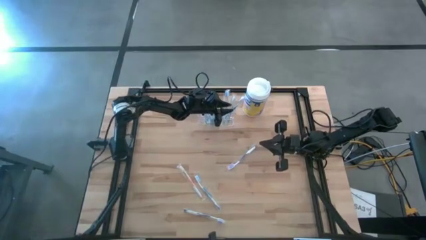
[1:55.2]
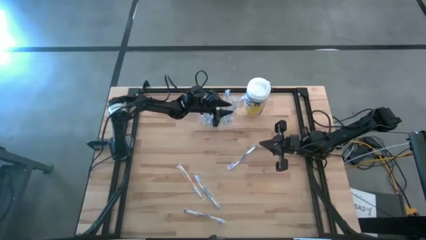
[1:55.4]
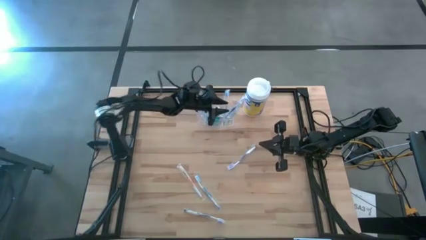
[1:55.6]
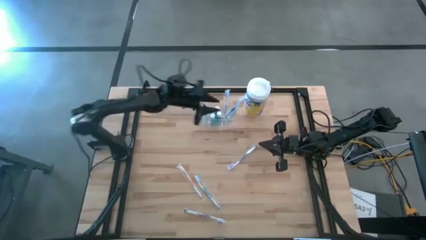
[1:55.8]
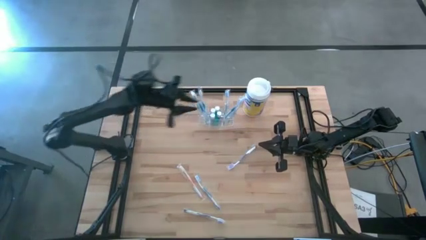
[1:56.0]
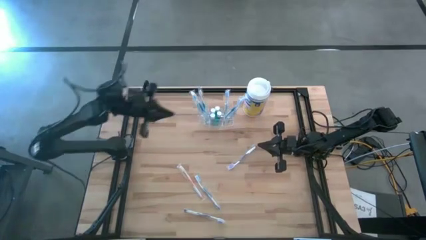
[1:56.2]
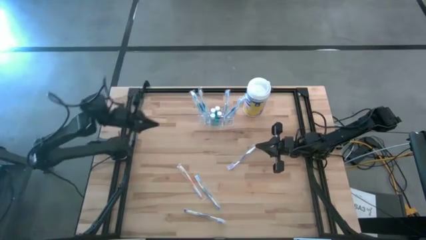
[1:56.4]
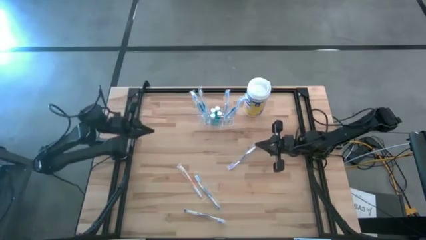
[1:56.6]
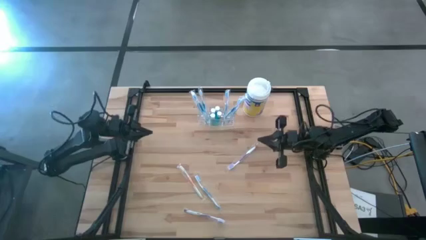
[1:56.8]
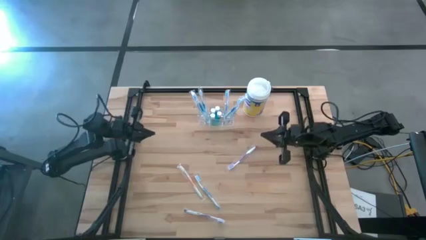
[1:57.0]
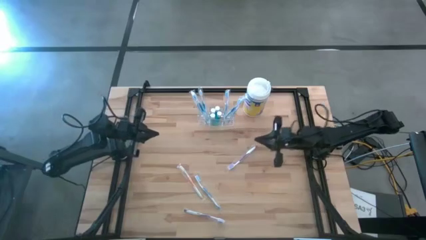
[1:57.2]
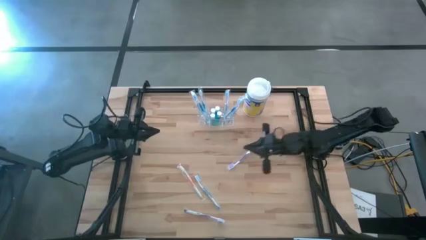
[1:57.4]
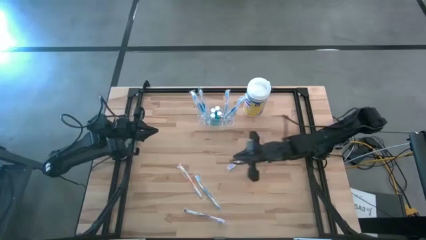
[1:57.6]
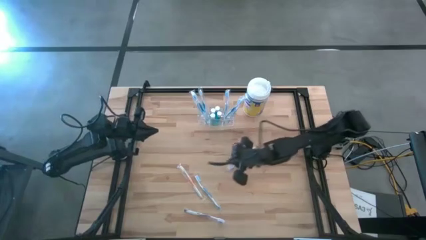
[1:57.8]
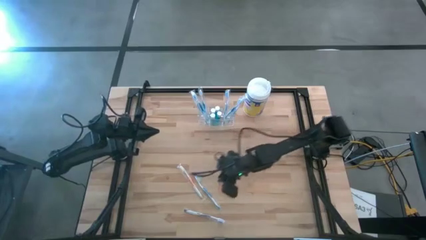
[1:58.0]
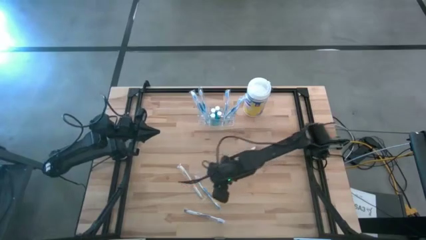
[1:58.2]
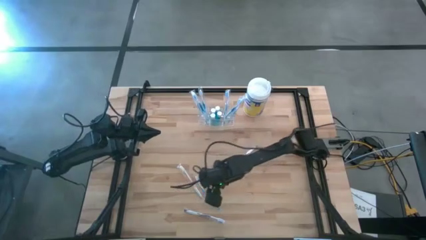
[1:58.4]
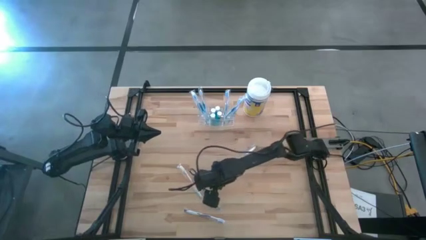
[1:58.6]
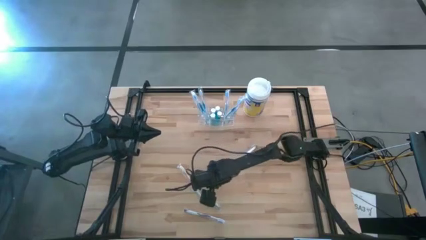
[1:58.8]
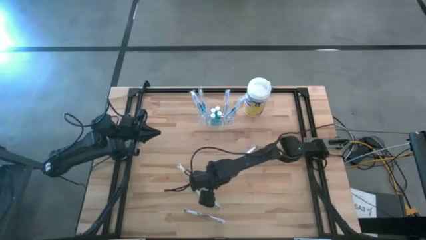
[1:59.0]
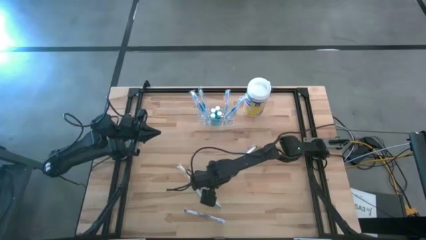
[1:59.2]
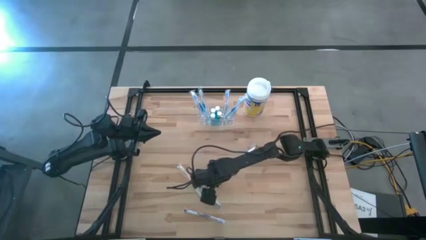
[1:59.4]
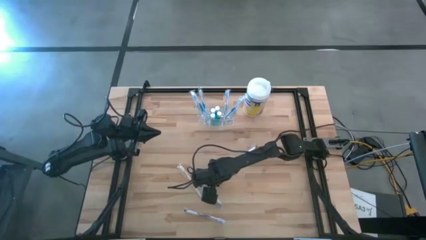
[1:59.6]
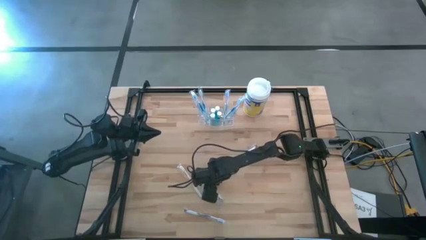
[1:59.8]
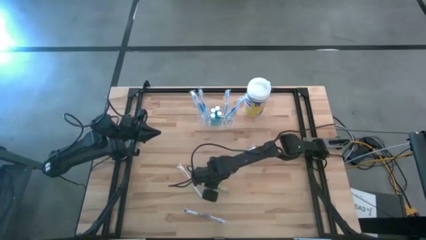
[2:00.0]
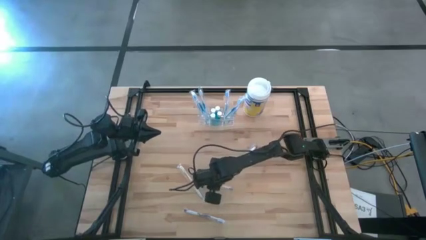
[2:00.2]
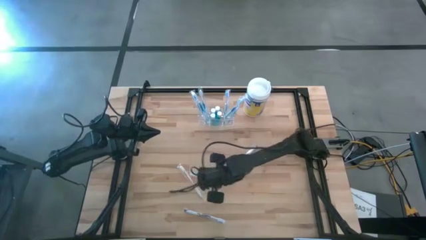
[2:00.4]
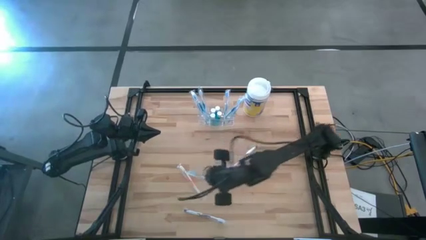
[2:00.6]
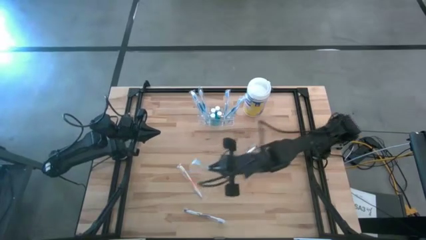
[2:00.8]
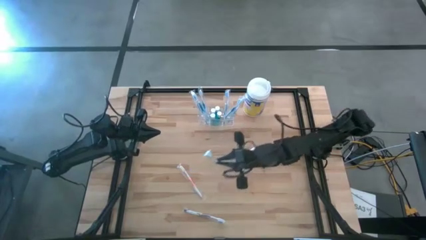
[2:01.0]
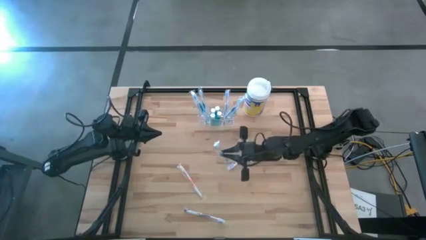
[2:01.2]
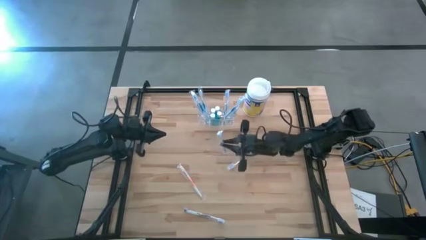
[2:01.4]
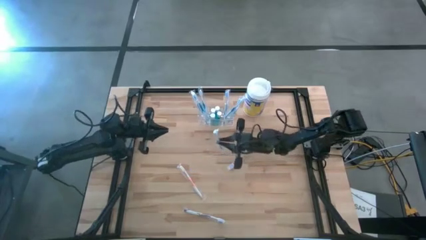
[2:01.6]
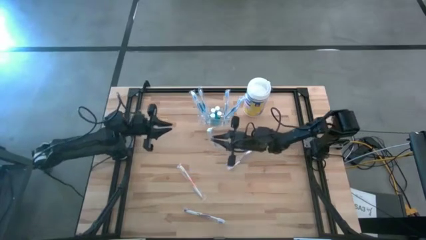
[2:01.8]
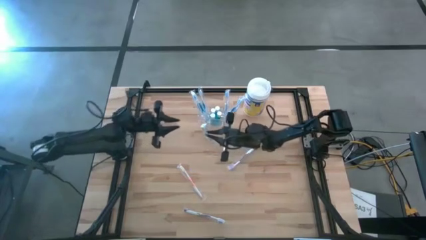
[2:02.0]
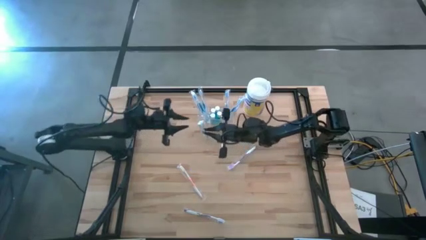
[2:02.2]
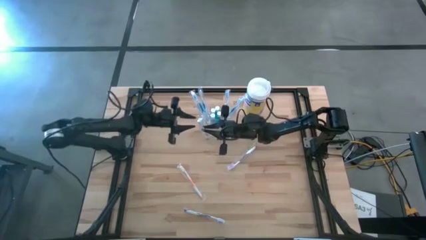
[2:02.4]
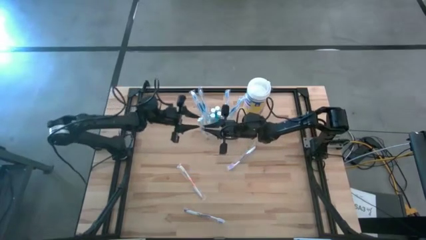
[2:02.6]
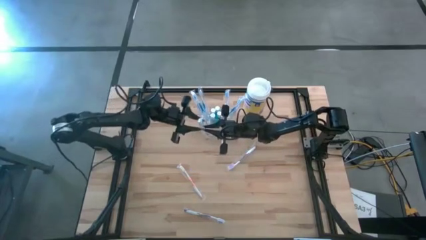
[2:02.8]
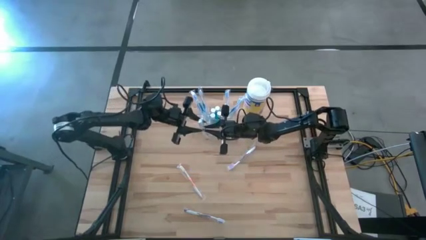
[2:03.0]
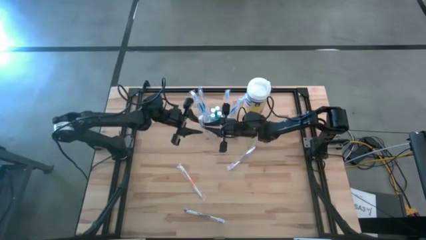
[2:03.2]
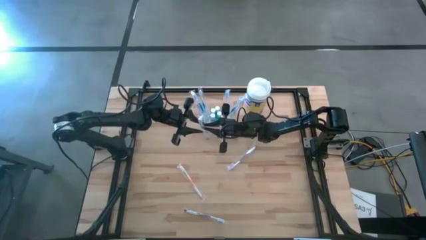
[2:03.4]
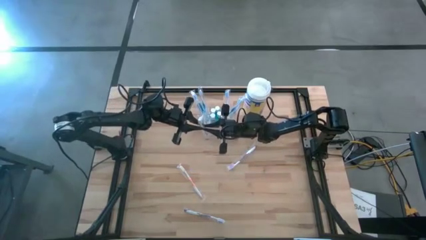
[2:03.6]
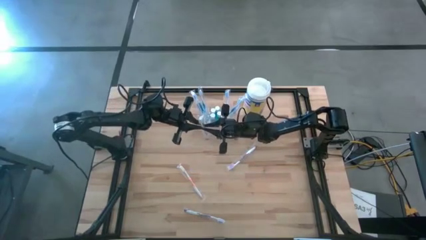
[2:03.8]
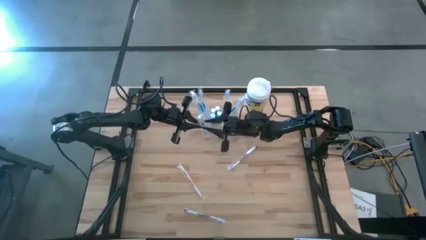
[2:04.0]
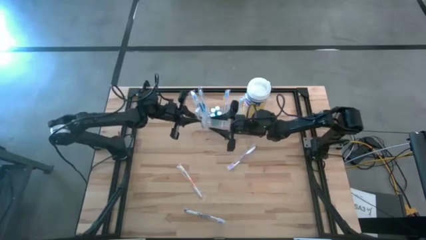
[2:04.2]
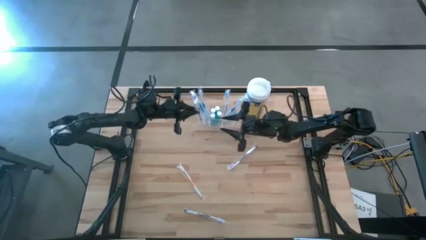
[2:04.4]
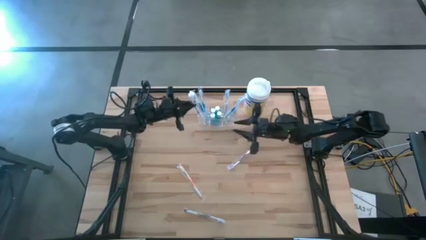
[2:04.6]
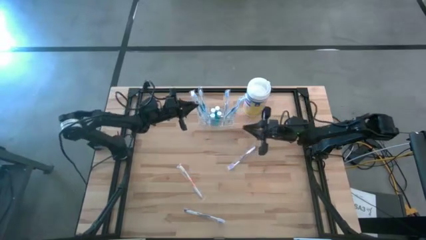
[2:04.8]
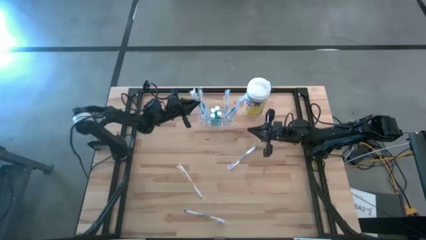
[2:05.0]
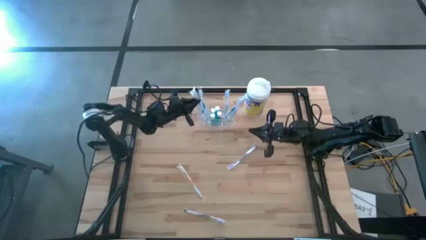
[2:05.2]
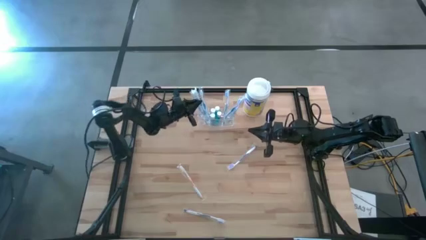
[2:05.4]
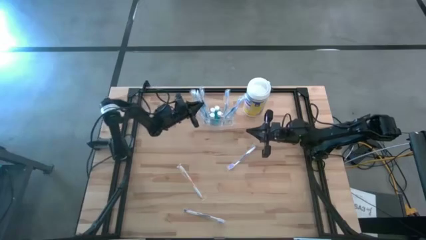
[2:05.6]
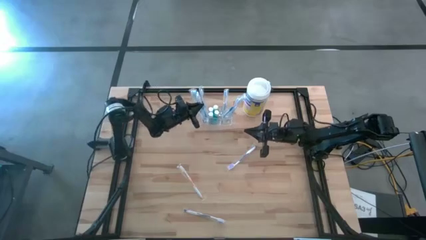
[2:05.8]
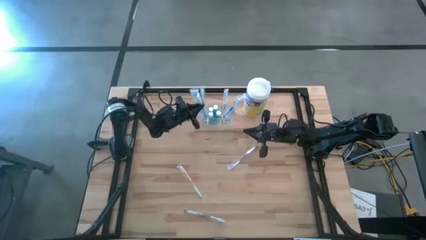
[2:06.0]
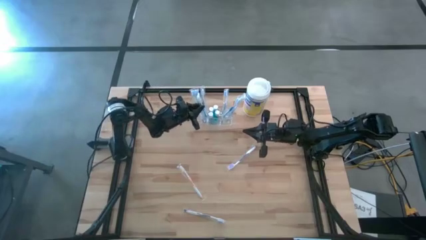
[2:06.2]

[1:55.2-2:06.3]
Task: Pick & Place toothbrushing station
Put the blue toothbrush into the transparent toothbrush holder

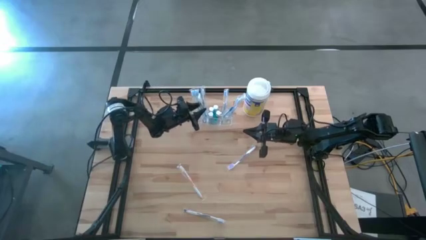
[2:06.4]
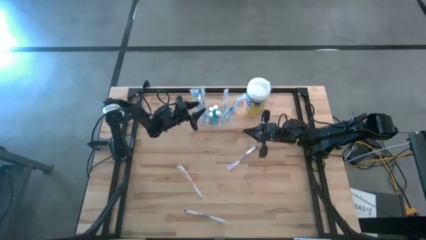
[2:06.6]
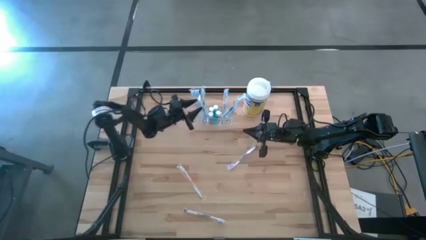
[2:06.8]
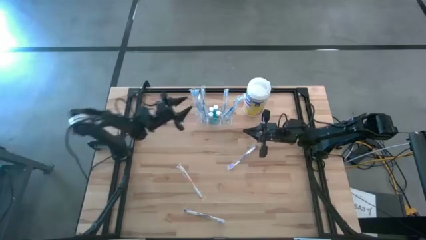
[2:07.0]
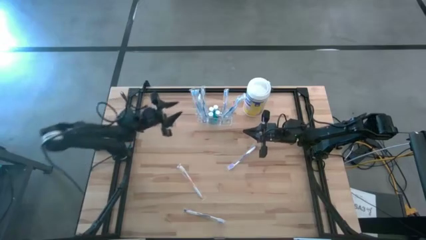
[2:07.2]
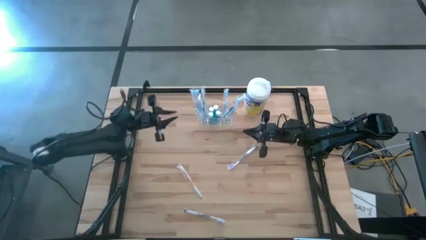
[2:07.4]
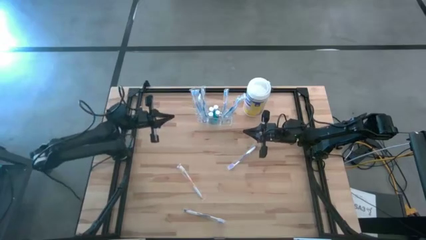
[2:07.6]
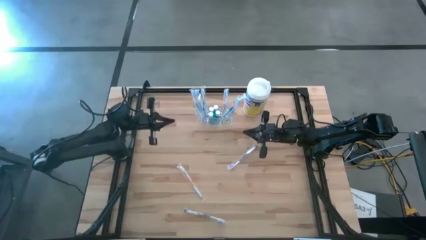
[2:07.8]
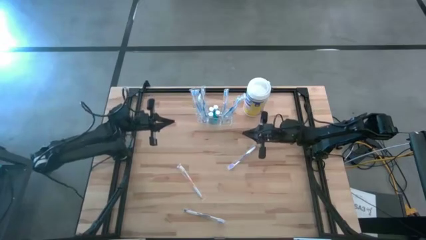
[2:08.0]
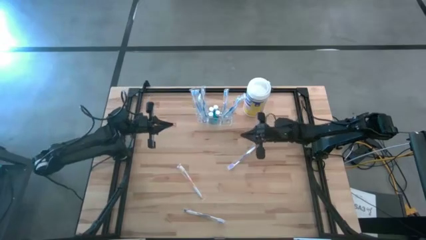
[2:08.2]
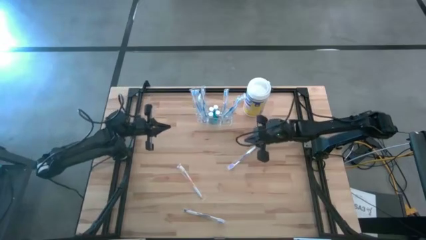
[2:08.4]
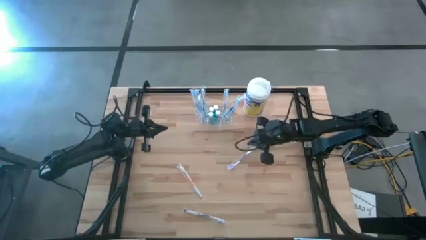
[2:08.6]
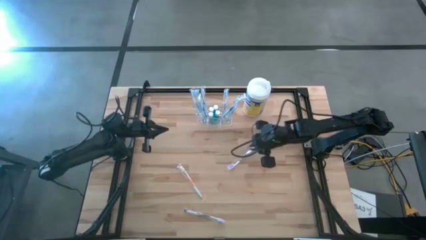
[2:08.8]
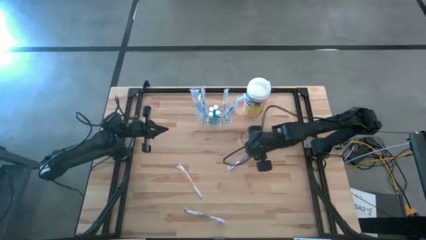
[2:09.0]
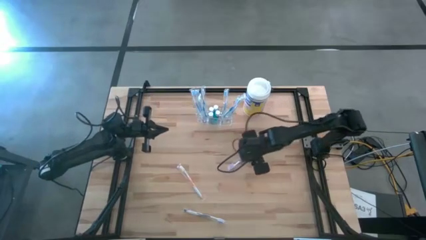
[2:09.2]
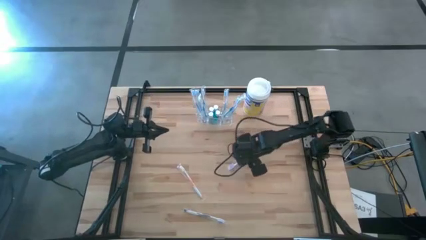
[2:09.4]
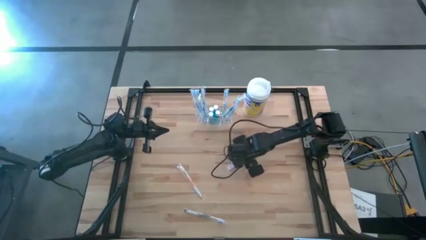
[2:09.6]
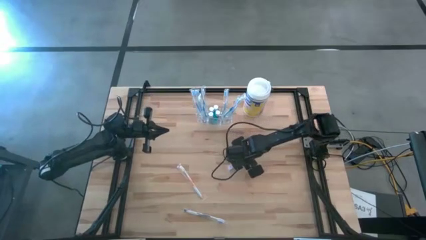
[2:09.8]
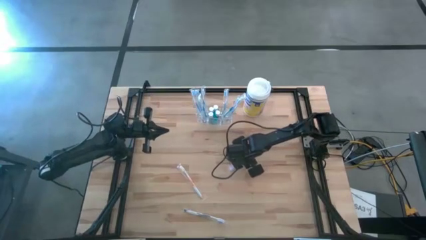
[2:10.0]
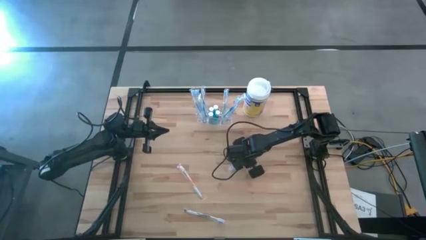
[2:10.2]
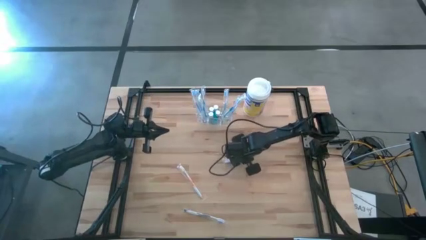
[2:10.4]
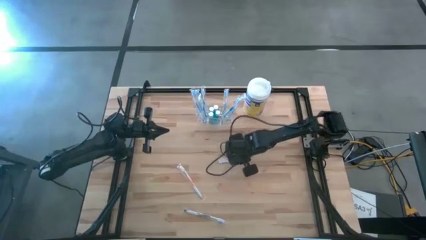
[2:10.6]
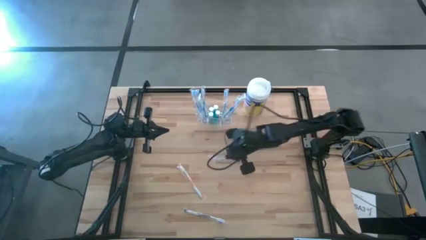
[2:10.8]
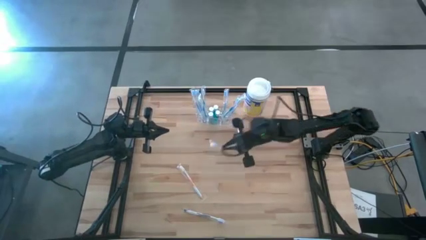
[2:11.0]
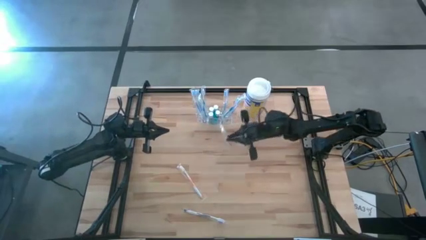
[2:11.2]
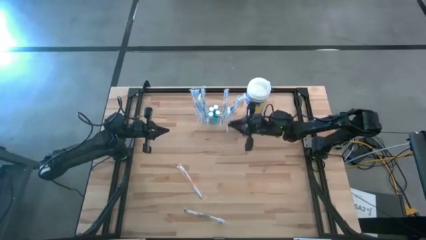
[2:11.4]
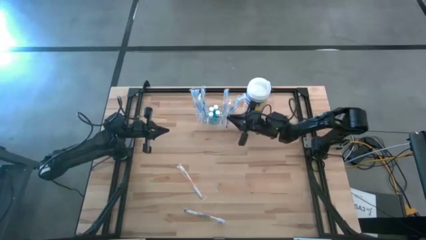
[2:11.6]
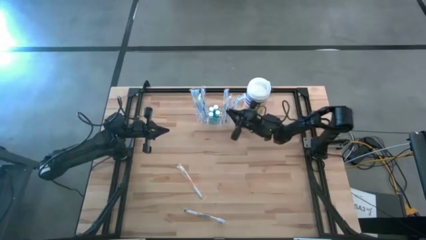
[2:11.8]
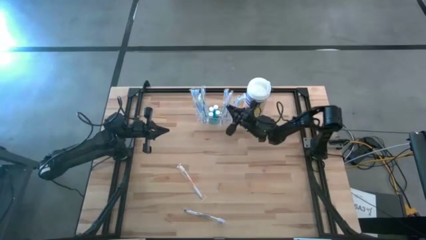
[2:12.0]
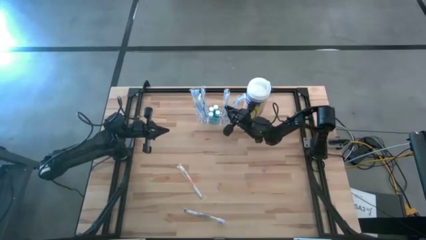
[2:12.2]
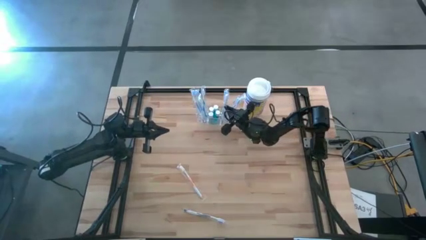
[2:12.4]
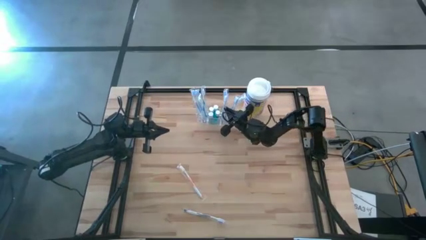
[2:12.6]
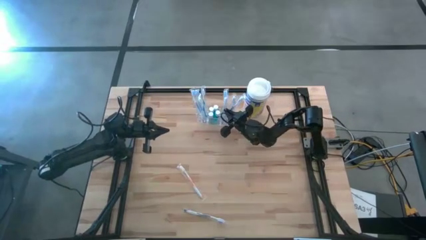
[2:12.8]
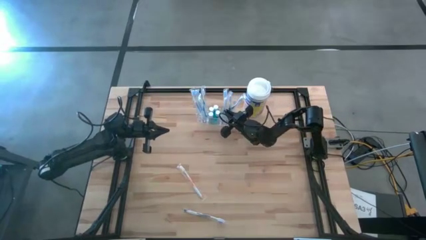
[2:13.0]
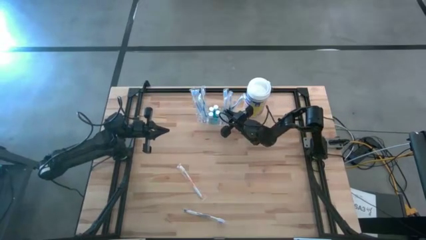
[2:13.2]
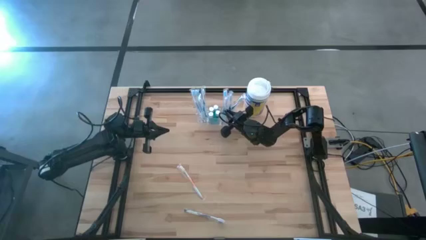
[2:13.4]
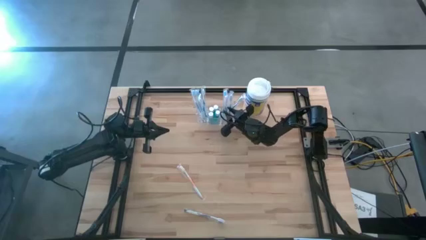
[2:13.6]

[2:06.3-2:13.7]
Put the violet toothbrush into the transparent toothbrush holder
